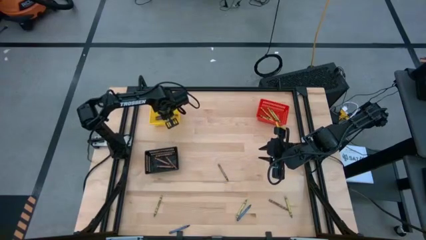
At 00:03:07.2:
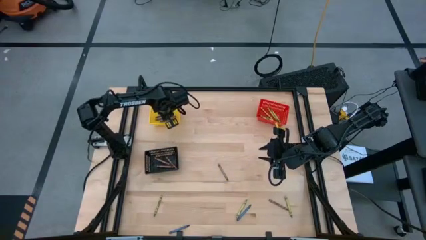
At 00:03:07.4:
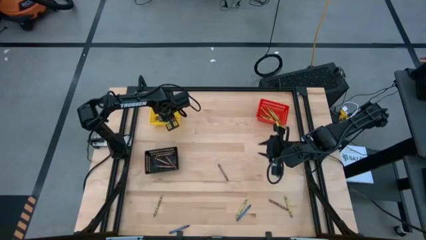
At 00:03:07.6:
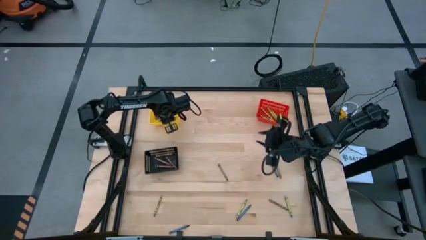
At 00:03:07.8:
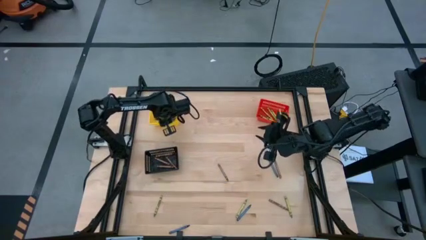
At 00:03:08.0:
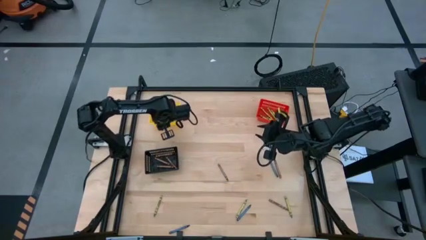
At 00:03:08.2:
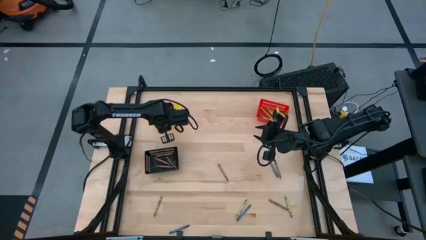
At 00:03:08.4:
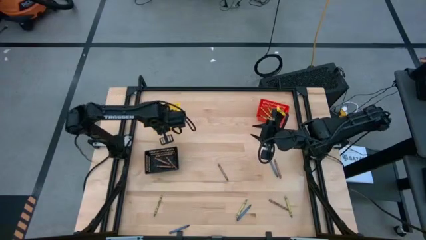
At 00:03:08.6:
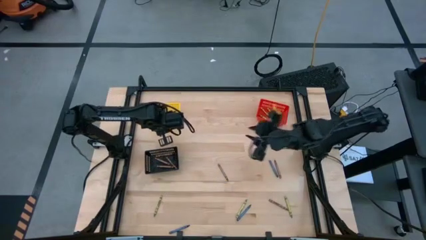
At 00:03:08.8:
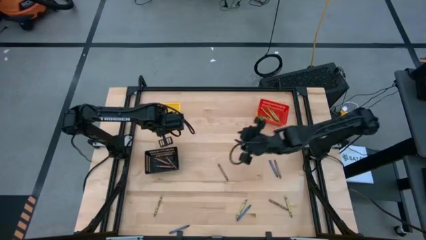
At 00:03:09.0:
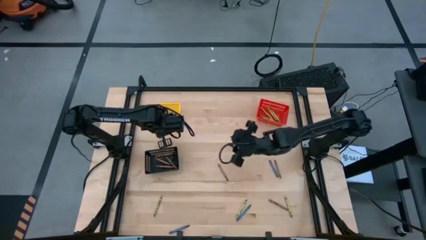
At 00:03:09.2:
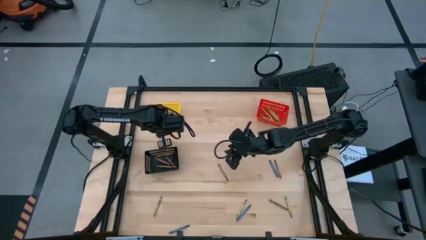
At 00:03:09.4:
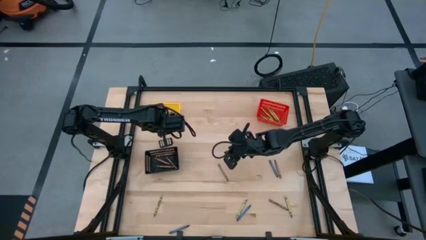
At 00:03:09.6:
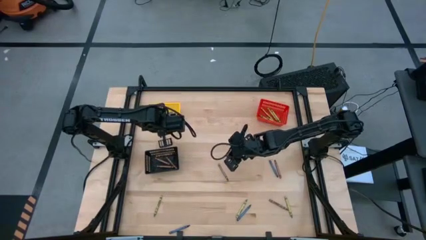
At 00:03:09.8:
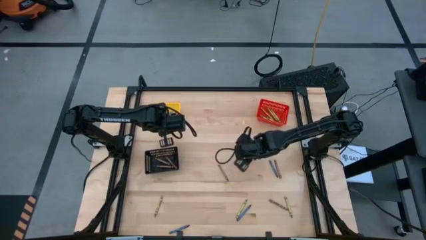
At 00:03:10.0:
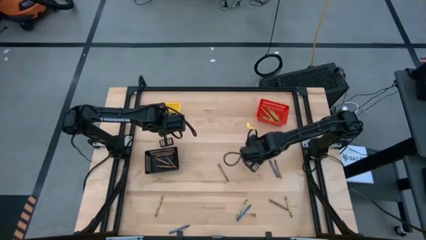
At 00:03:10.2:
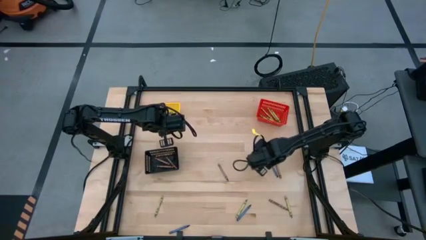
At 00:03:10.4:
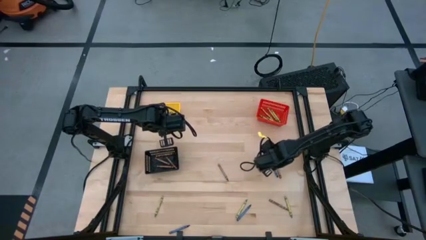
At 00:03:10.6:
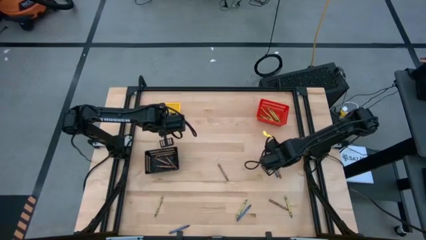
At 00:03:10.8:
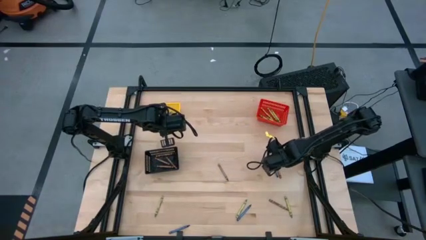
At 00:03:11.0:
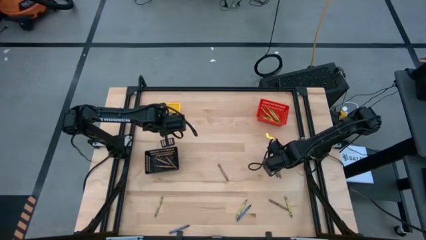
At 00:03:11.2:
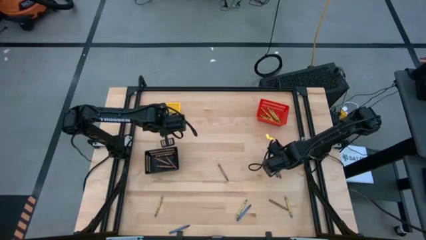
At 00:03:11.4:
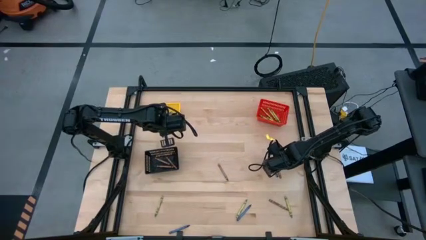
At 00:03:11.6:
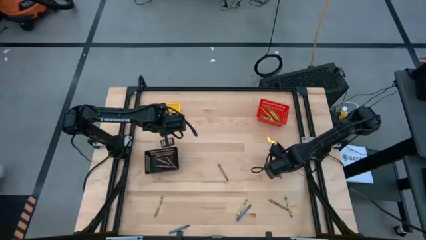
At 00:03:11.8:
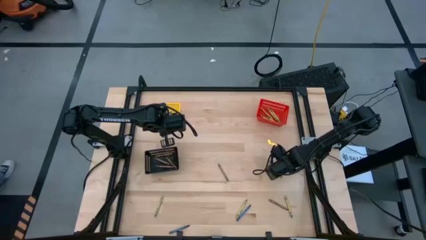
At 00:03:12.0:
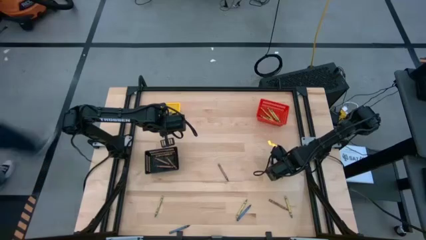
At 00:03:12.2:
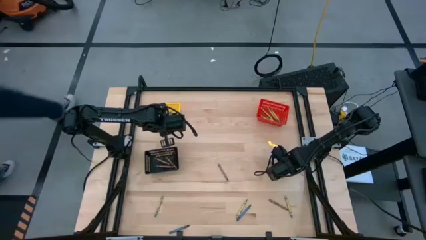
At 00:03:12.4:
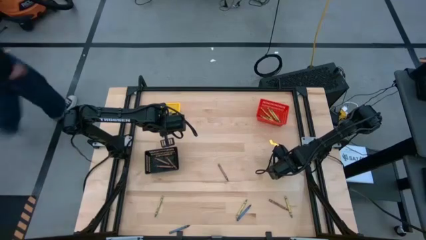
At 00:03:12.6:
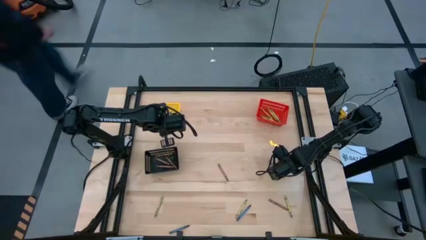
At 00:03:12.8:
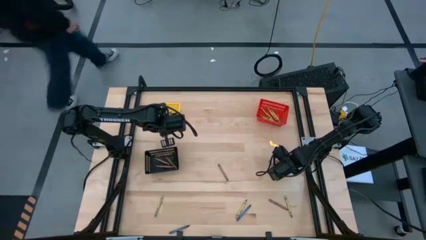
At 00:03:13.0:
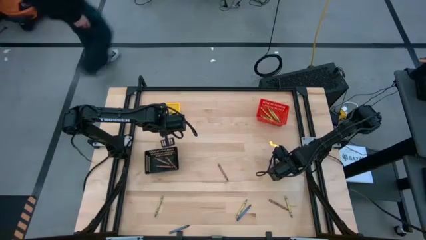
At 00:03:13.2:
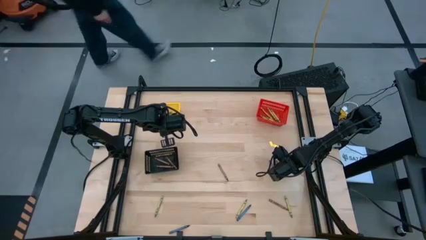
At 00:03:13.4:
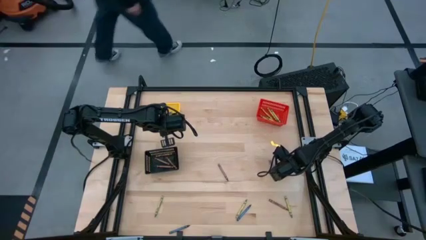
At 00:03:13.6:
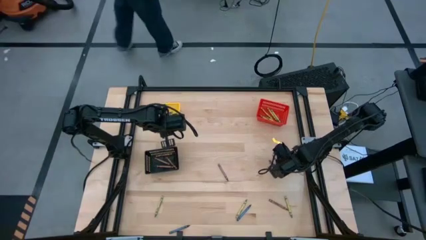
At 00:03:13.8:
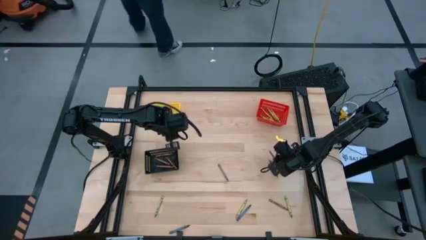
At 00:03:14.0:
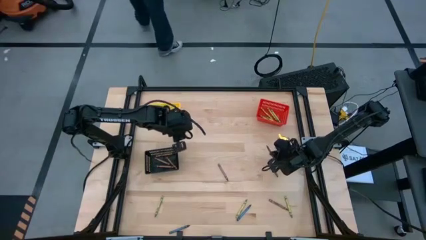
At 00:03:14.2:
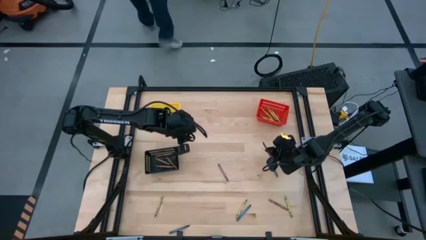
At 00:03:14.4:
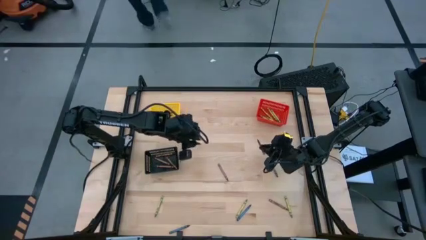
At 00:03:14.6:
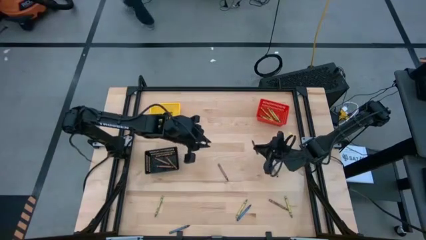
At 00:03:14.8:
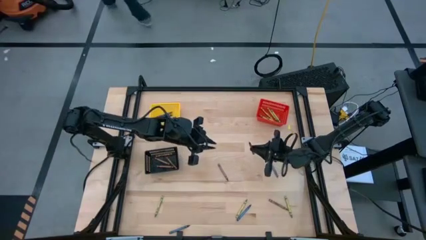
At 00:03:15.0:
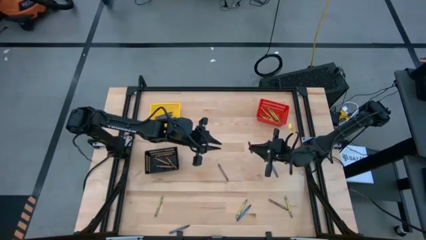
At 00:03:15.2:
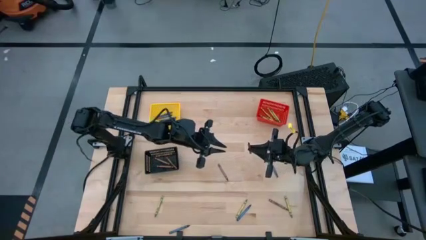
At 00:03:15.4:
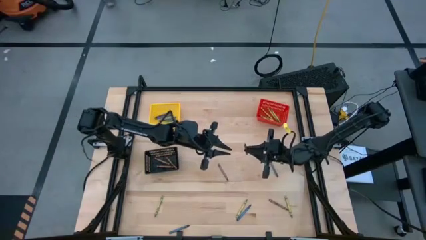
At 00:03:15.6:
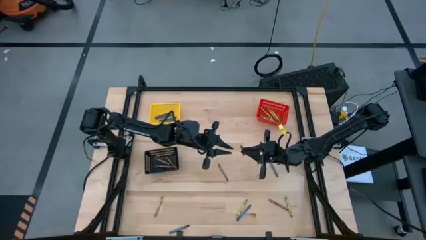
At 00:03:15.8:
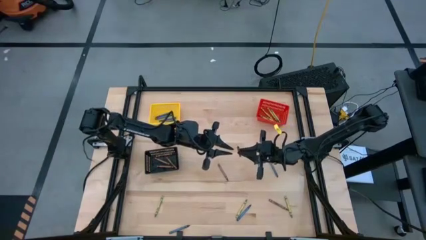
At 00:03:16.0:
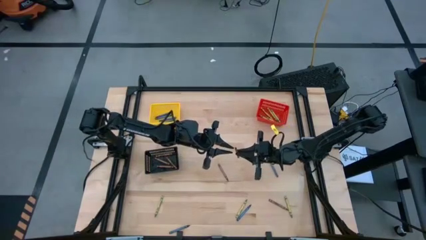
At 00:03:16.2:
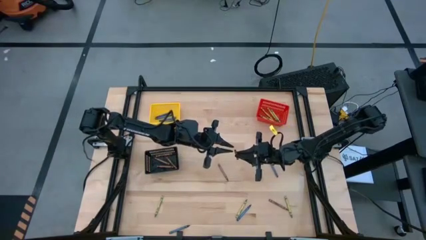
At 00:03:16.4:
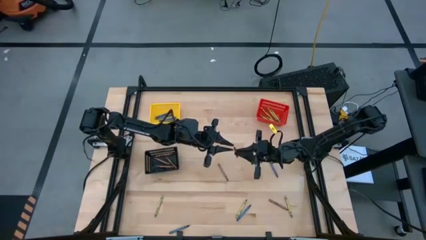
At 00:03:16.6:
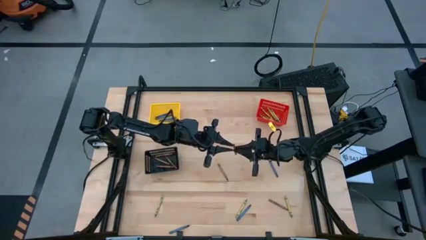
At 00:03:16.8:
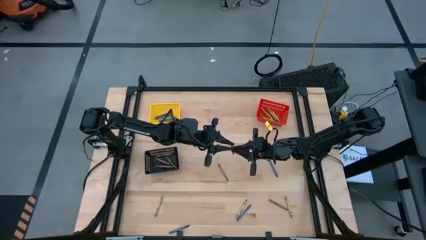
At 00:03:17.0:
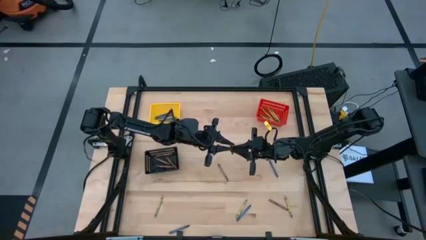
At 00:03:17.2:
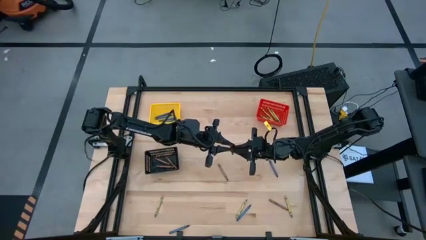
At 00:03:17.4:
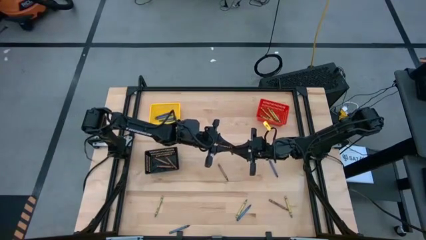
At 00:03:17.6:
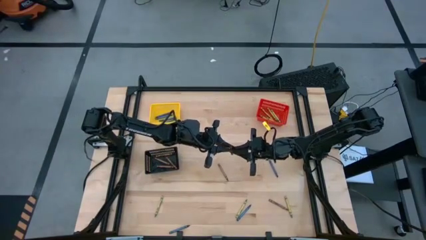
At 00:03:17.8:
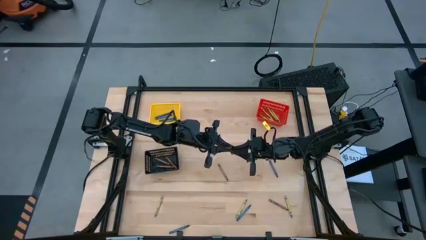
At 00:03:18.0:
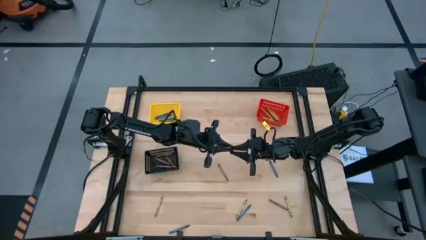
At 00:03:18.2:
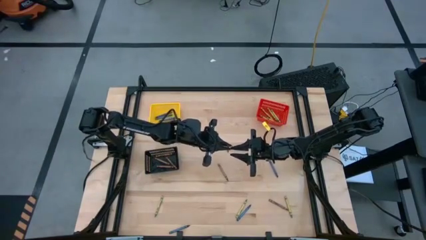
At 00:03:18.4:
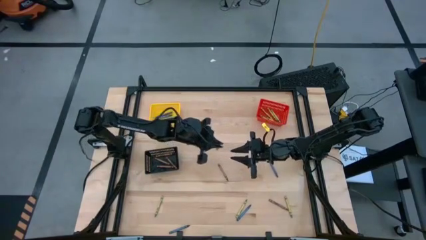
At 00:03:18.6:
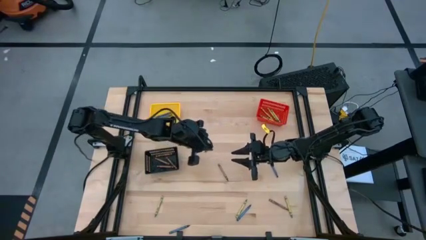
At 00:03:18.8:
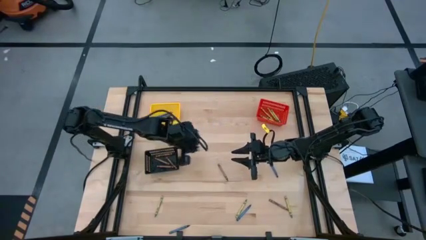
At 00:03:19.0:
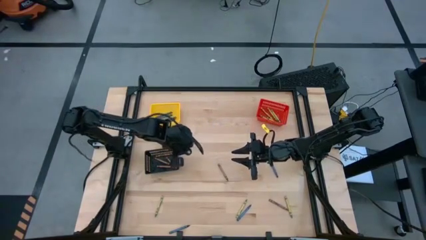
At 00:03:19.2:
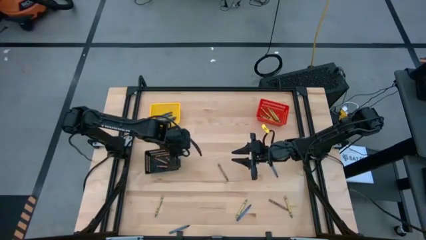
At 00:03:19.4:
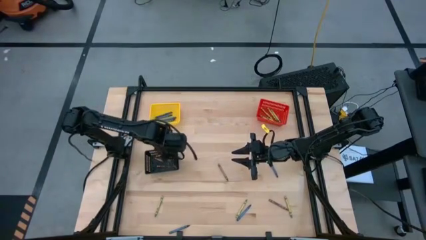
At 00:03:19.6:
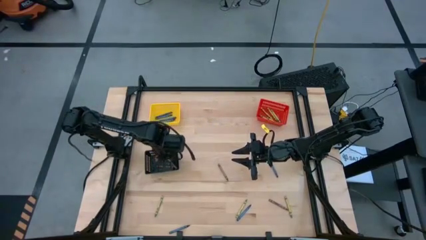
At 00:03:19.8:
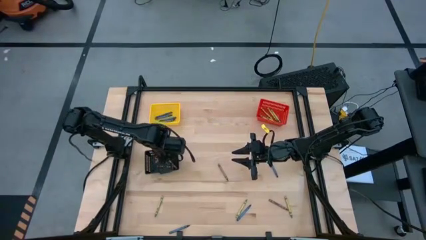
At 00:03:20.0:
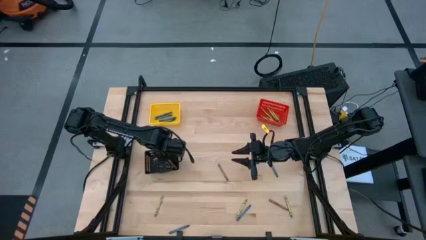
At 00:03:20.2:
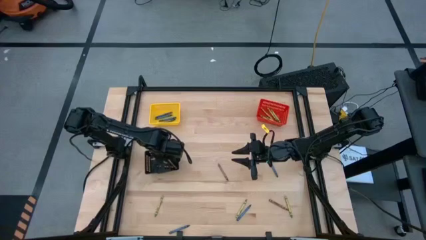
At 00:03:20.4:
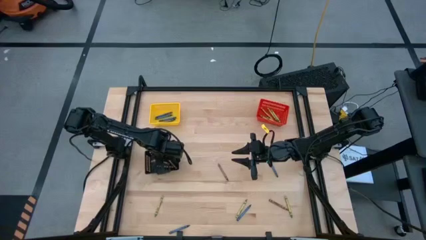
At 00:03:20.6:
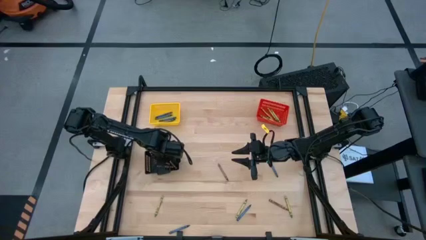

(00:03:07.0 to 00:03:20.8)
Task: Sort crayons
Put the brown crayon into the black bin
